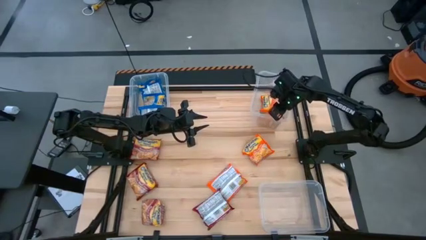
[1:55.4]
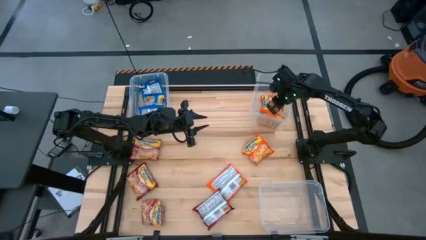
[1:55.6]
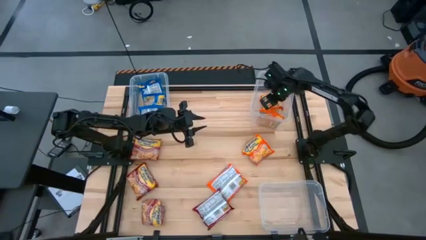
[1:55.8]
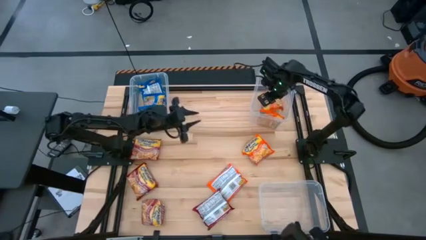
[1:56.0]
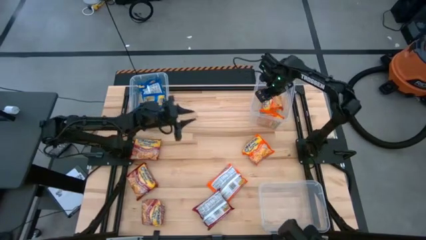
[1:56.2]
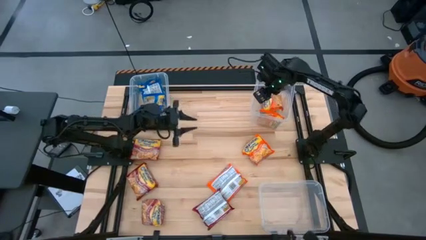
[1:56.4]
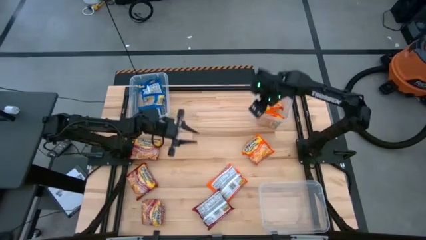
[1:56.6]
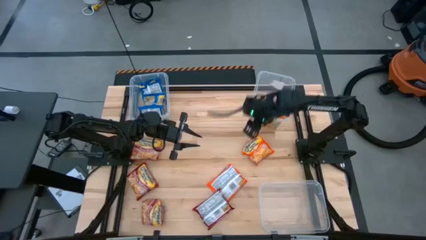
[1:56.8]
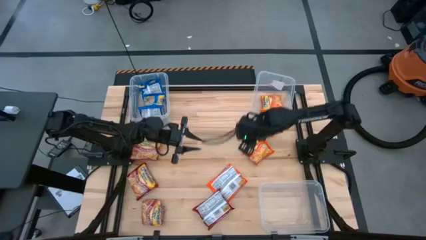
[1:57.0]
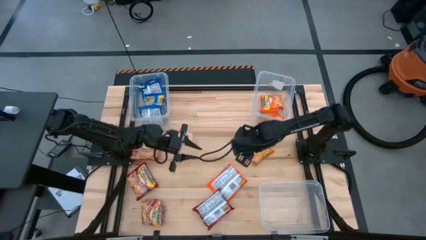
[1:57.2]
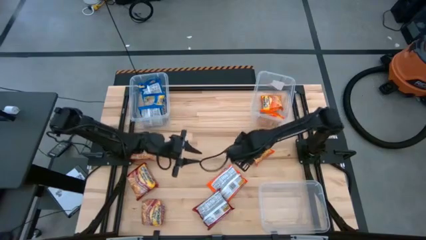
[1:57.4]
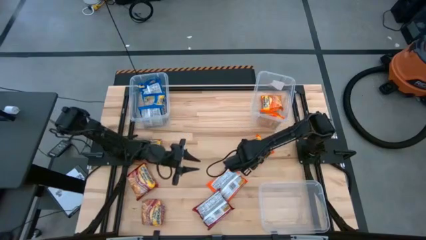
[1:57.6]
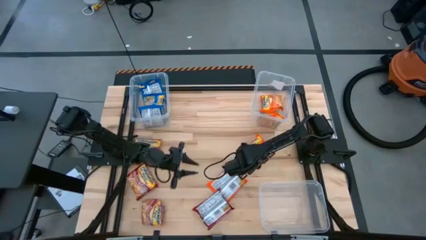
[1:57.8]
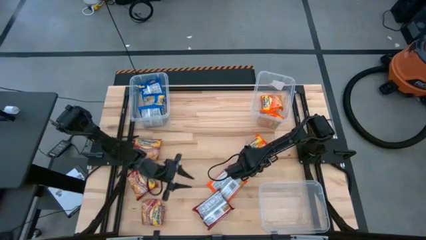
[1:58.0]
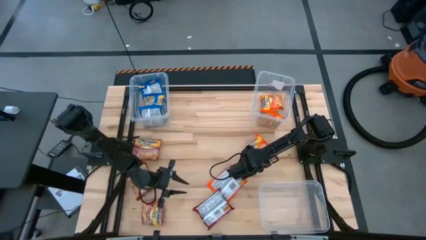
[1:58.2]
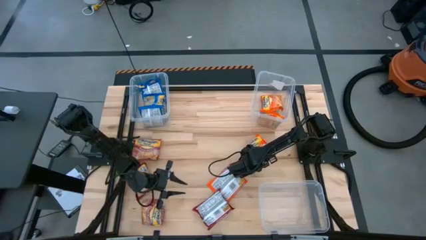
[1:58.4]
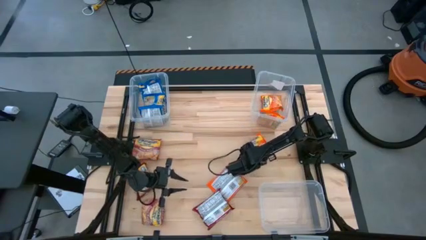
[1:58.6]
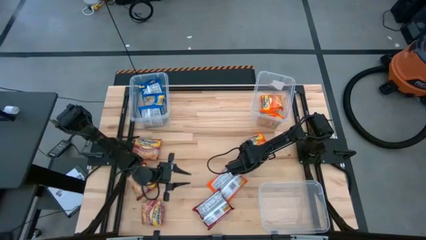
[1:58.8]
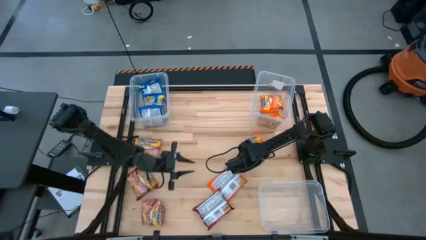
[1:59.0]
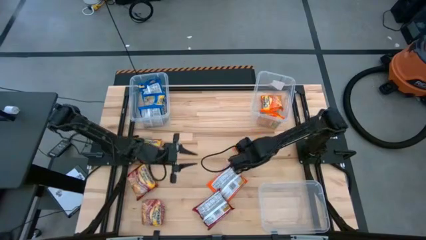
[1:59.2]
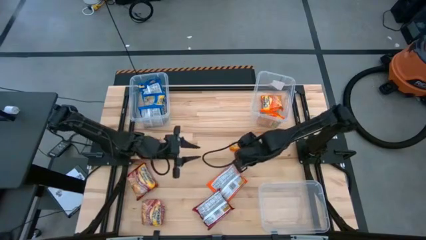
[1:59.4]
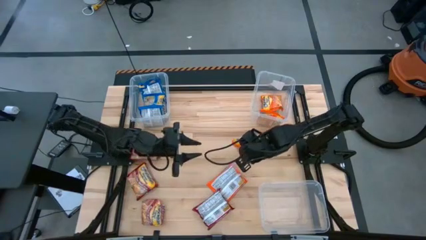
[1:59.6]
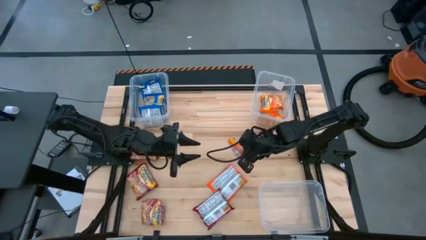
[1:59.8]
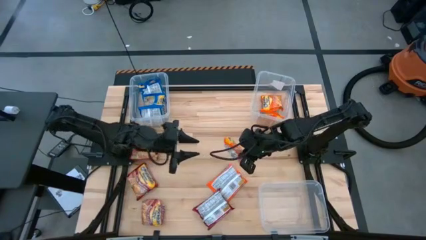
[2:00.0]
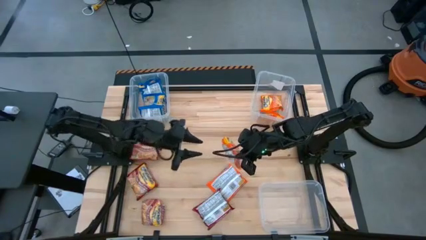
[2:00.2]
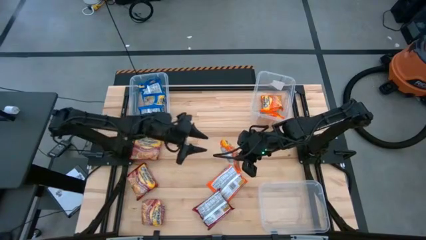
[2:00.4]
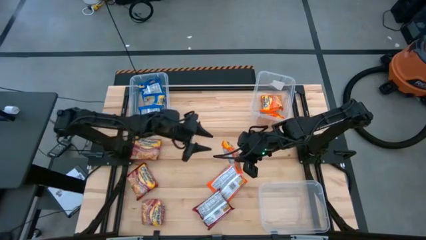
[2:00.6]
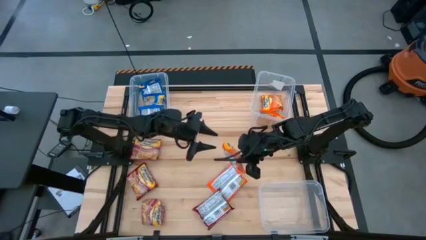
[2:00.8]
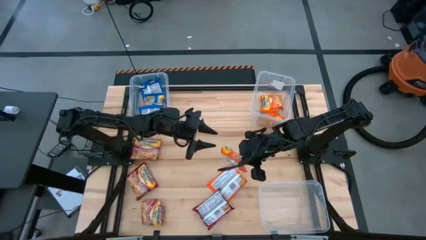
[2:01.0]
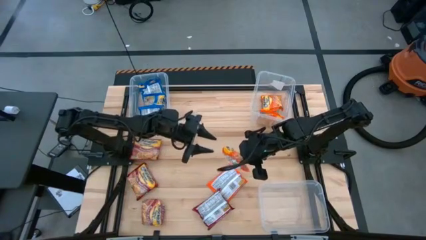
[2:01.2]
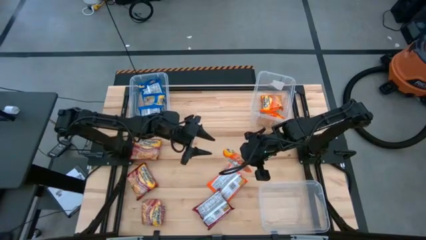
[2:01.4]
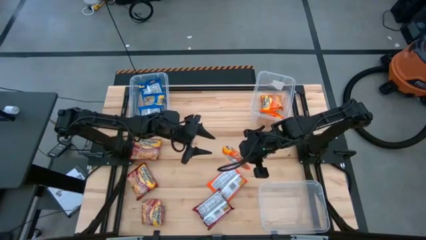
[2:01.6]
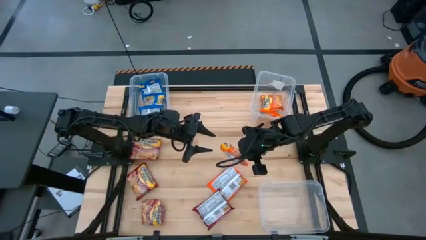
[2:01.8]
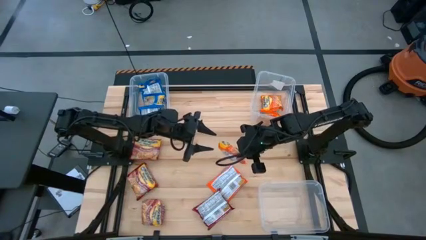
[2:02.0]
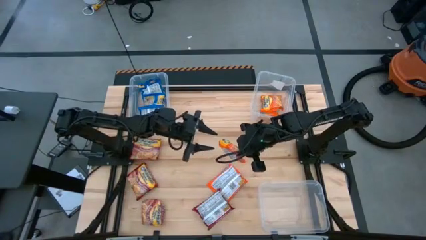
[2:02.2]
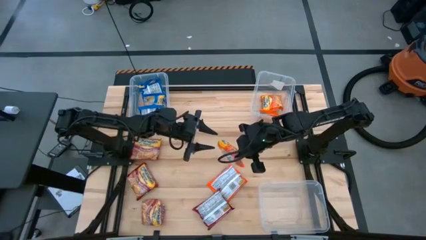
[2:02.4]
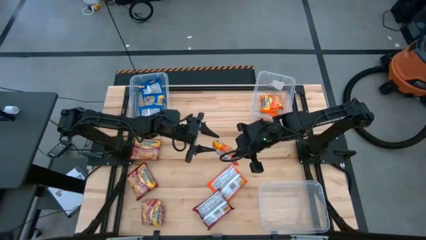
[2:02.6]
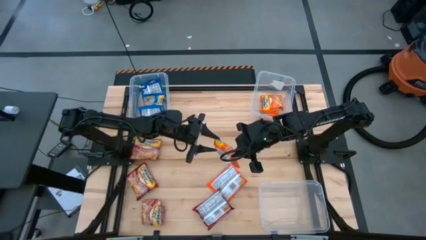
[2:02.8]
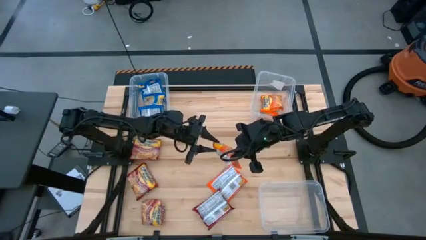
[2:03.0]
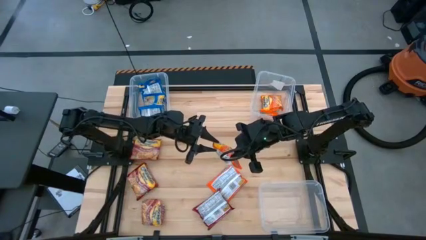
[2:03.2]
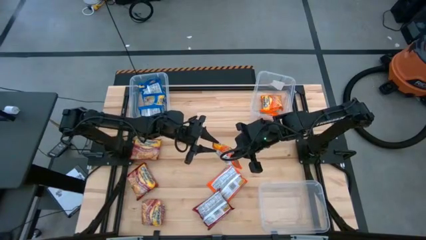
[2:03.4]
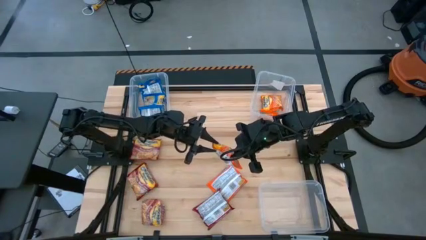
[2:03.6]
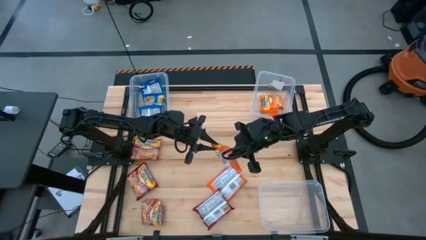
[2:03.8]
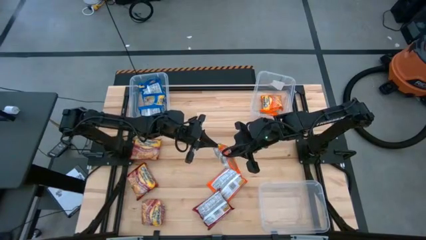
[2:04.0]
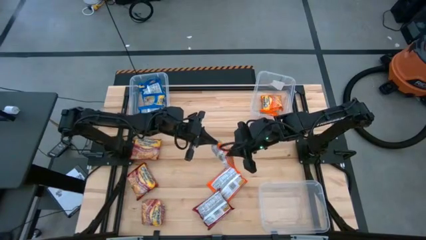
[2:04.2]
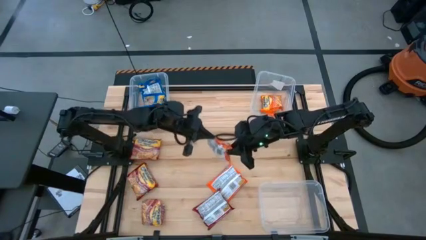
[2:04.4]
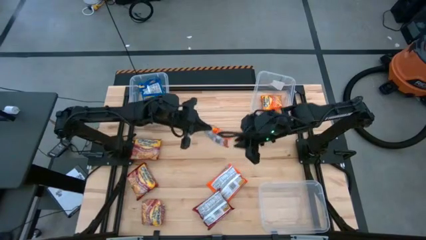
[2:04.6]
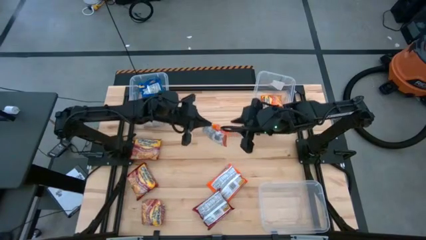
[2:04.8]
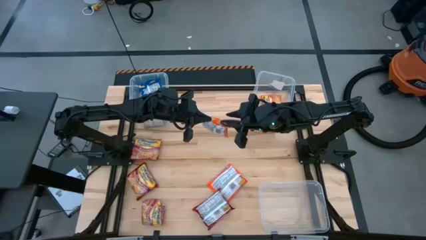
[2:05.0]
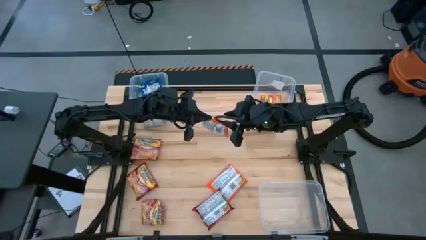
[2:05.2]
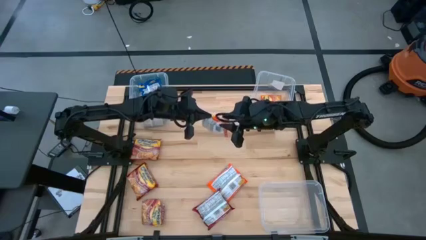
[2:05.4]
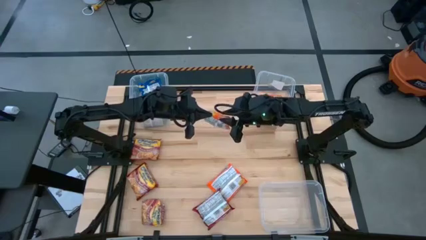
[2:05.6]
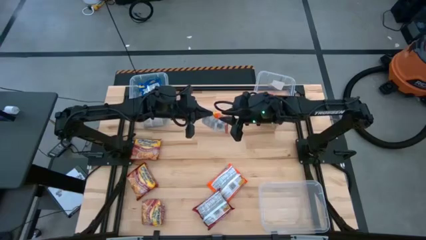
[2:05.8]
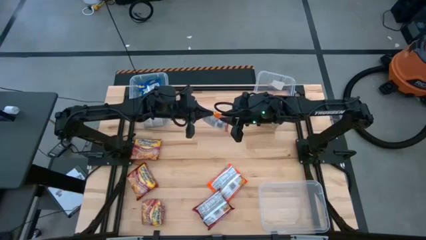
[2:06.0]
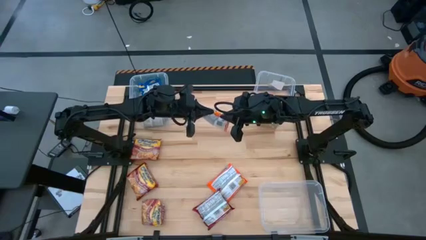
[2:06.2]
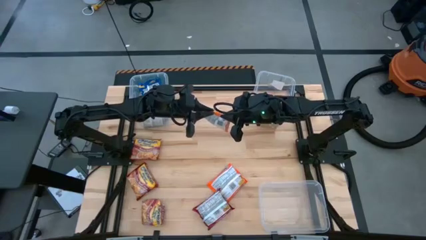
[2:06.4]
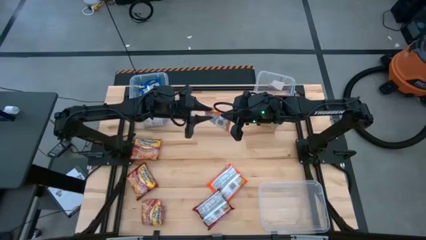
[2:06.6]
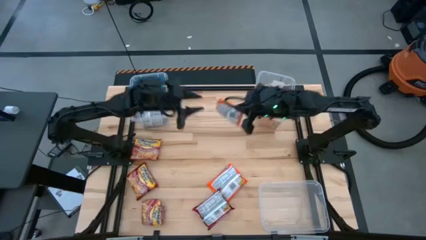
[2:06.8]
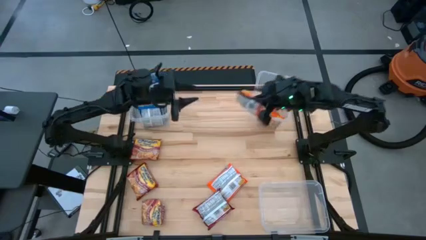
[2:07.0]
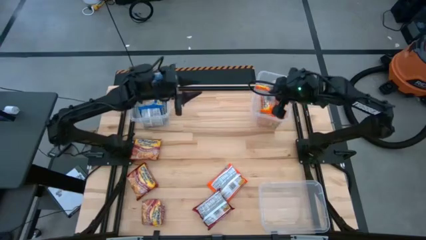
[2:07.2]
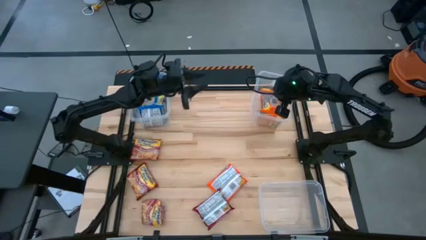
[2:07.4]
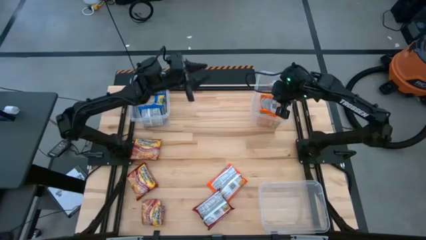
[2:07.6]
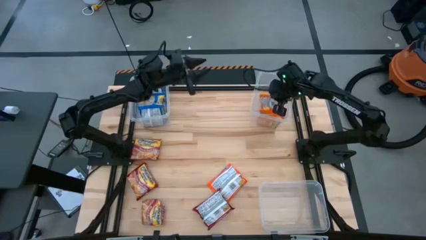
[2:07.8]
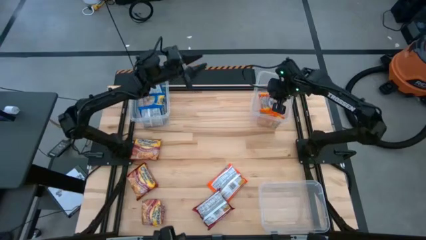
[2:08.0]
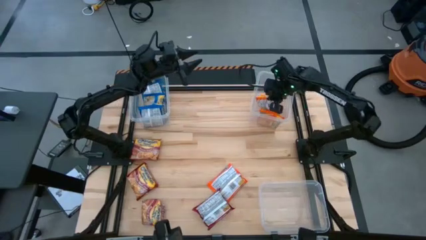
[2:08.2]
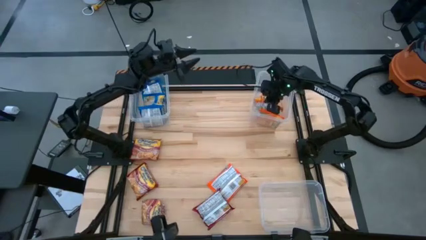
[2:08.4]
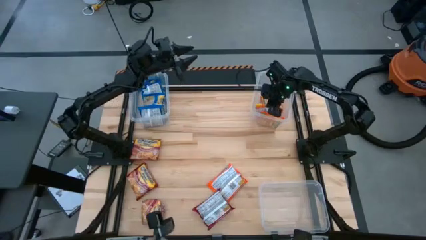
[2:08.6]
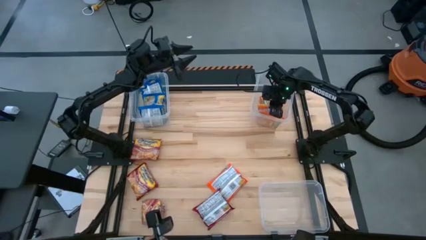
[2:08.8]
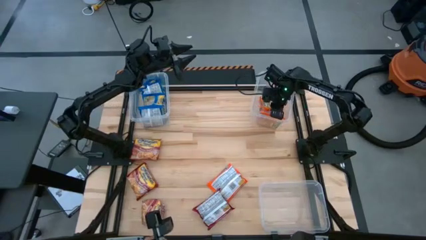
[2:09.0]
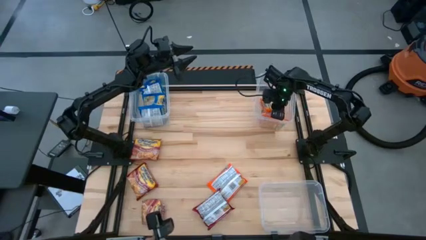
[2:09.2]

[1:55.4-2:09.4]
Task: Sort Maruchan noodles
Put the orange noodle pack into the top right transparent bin
